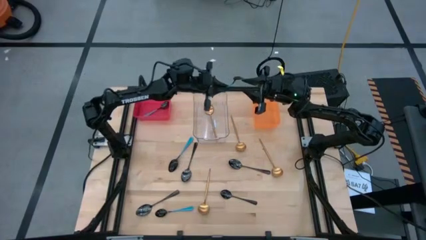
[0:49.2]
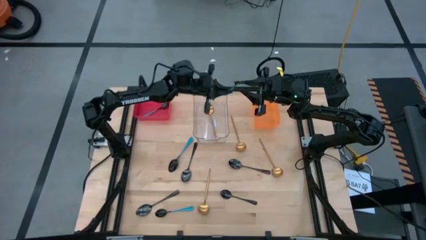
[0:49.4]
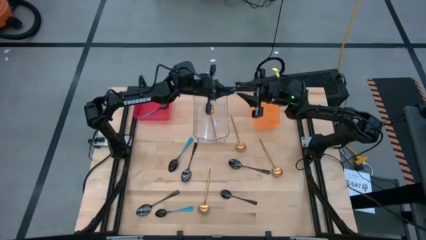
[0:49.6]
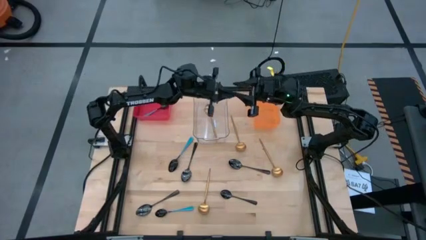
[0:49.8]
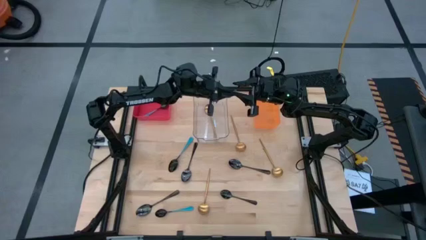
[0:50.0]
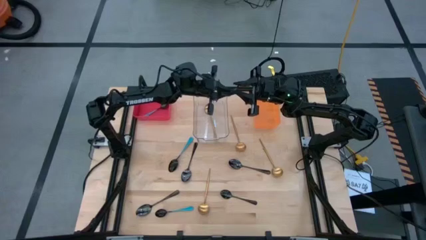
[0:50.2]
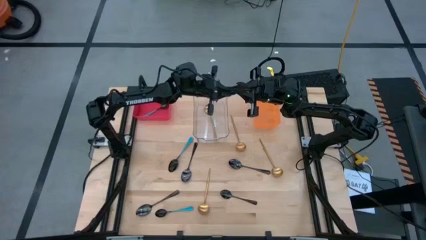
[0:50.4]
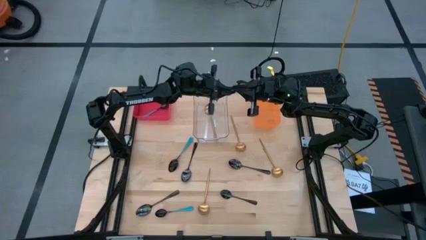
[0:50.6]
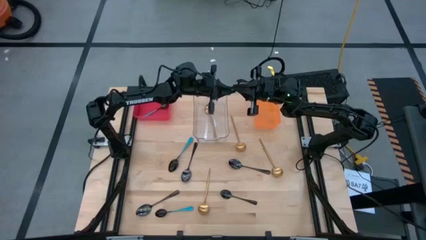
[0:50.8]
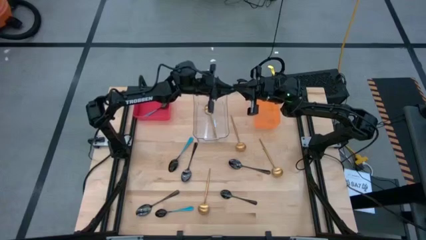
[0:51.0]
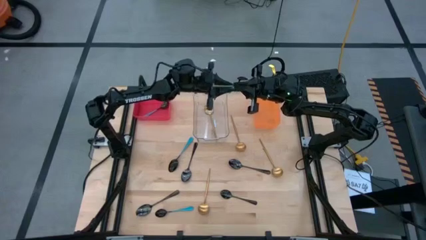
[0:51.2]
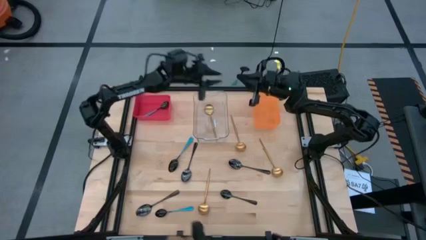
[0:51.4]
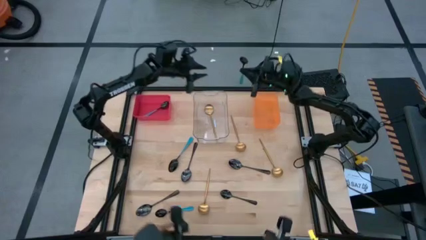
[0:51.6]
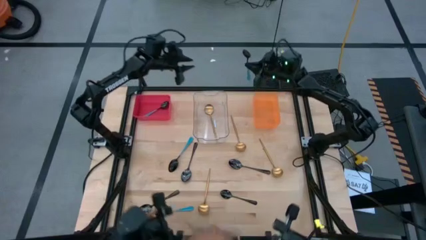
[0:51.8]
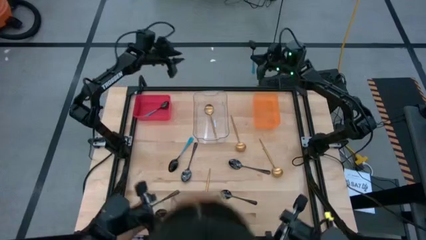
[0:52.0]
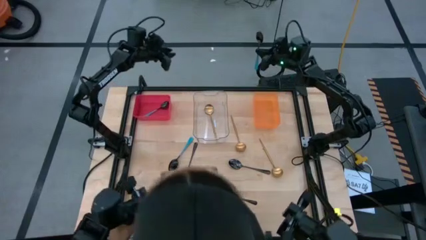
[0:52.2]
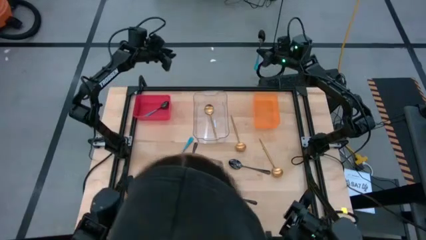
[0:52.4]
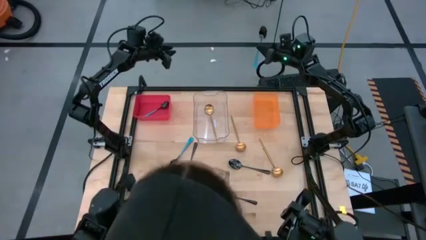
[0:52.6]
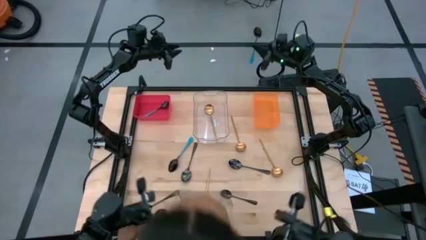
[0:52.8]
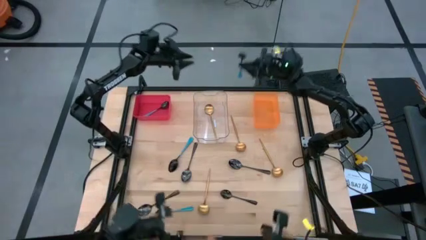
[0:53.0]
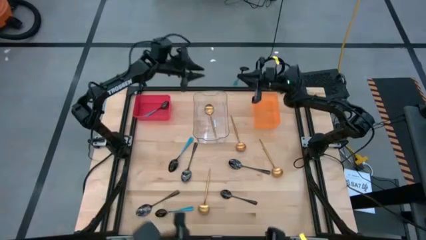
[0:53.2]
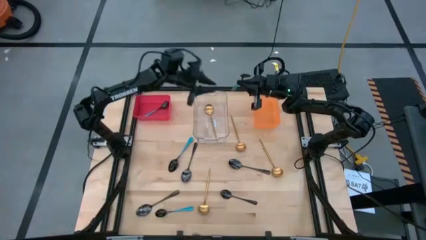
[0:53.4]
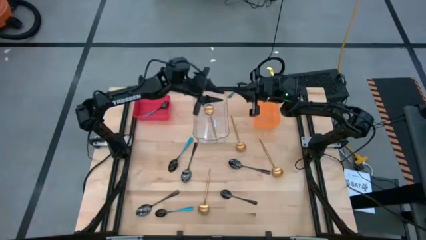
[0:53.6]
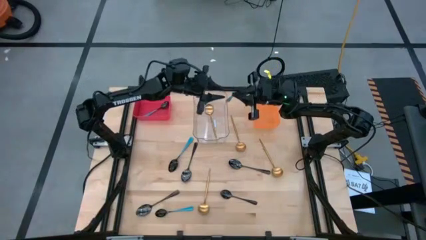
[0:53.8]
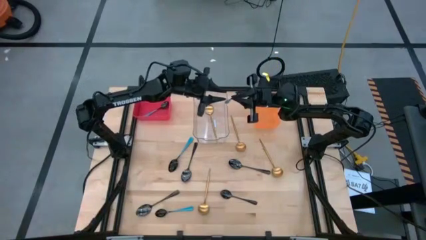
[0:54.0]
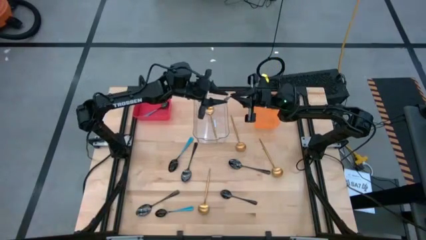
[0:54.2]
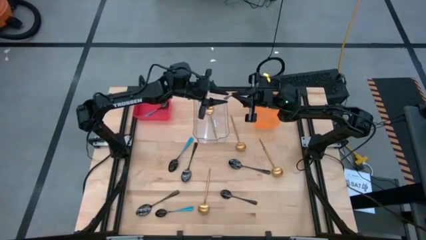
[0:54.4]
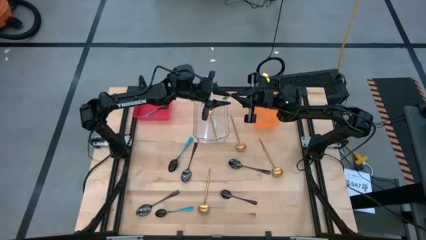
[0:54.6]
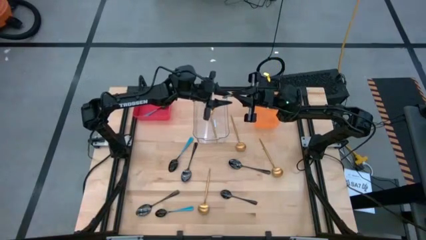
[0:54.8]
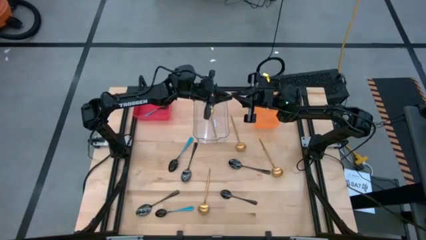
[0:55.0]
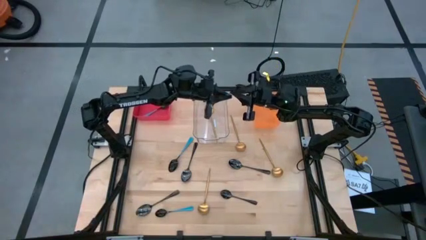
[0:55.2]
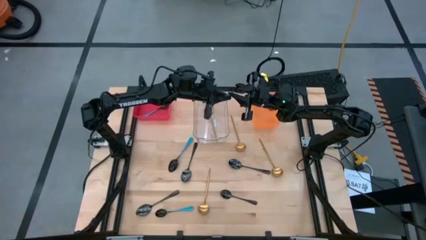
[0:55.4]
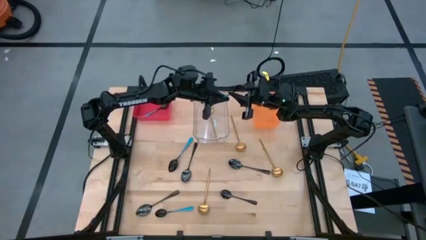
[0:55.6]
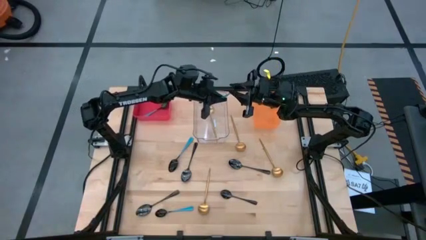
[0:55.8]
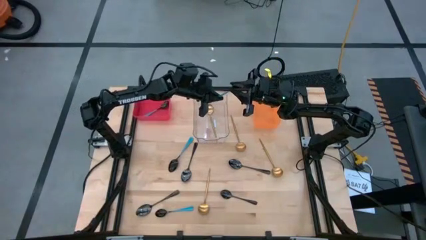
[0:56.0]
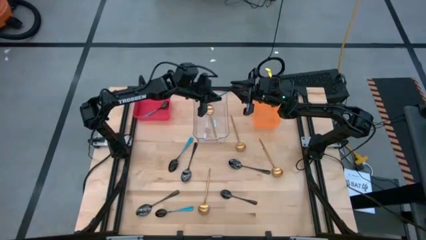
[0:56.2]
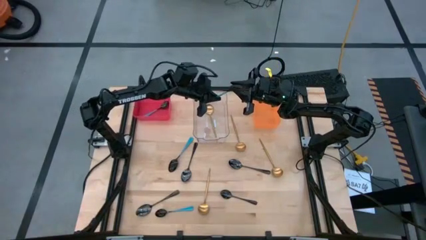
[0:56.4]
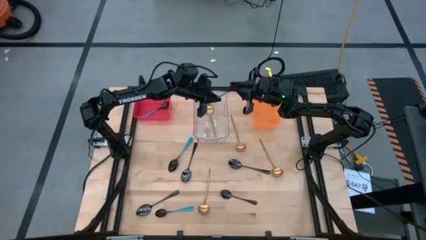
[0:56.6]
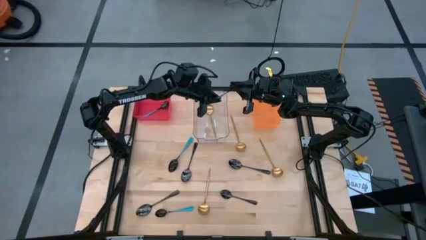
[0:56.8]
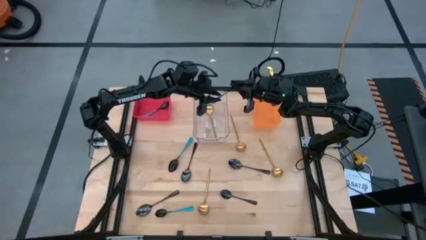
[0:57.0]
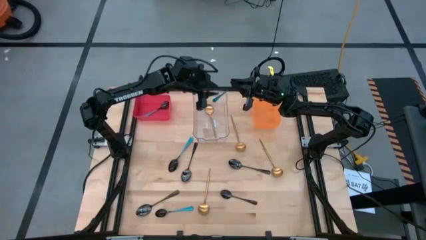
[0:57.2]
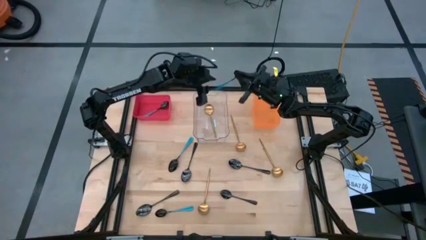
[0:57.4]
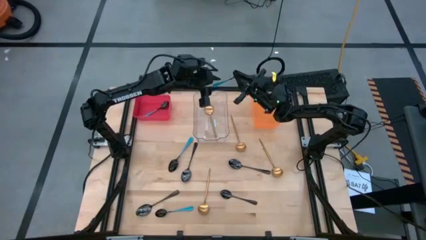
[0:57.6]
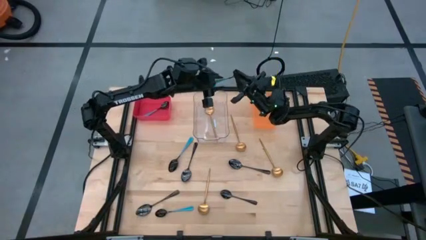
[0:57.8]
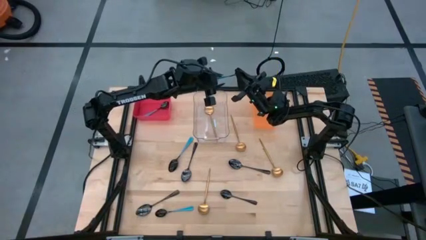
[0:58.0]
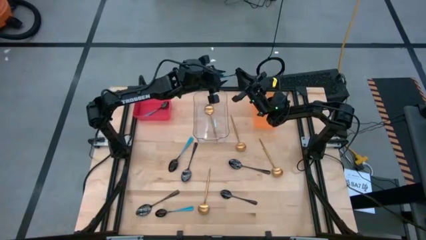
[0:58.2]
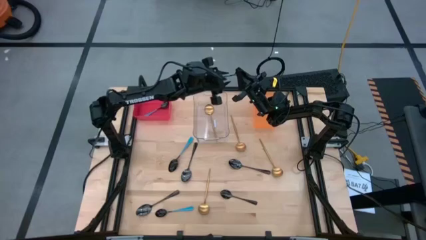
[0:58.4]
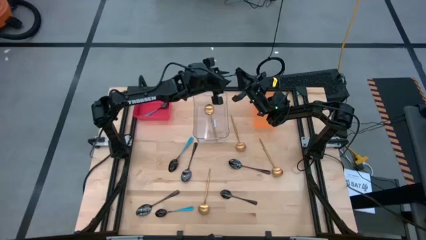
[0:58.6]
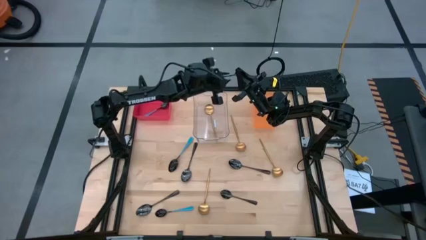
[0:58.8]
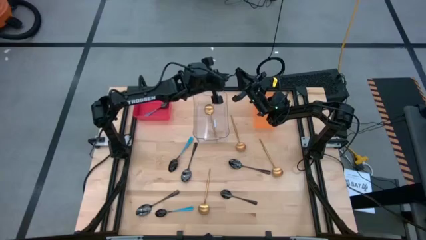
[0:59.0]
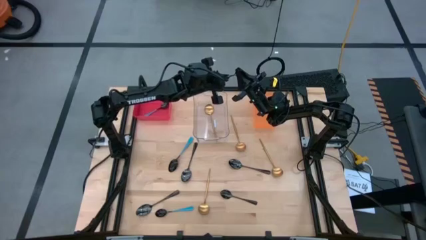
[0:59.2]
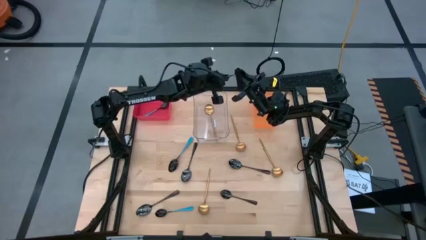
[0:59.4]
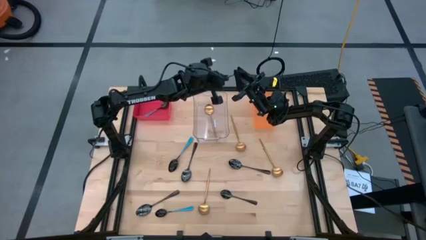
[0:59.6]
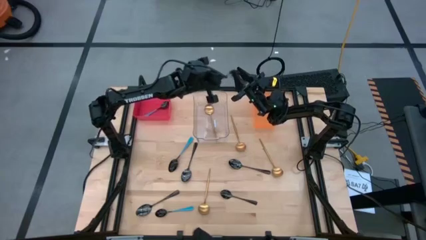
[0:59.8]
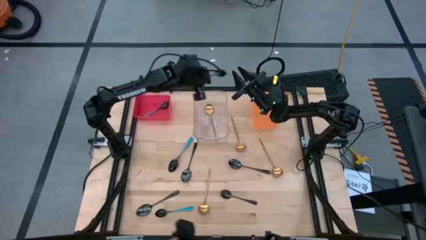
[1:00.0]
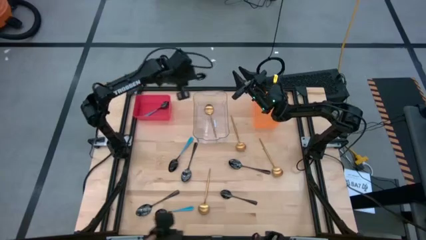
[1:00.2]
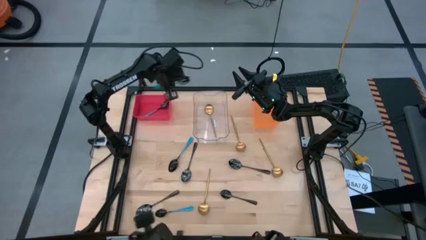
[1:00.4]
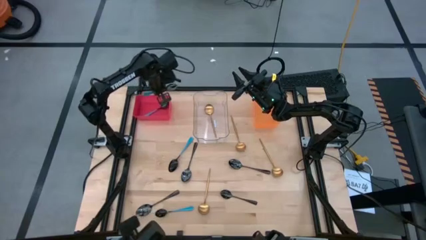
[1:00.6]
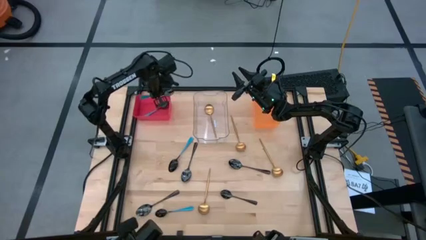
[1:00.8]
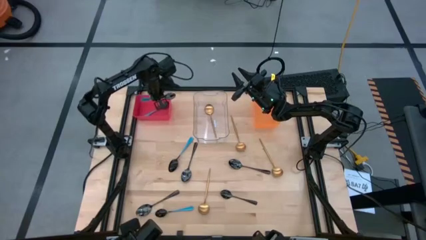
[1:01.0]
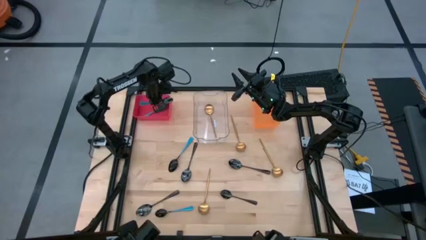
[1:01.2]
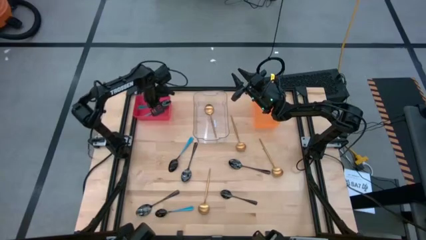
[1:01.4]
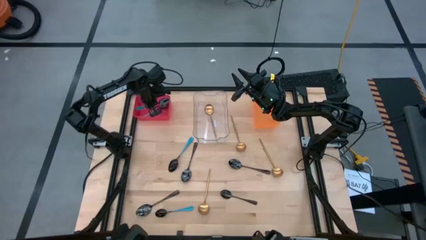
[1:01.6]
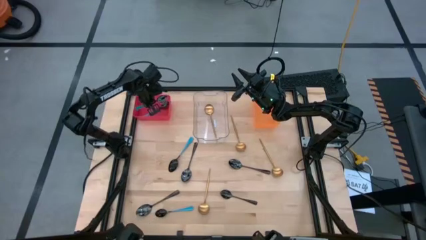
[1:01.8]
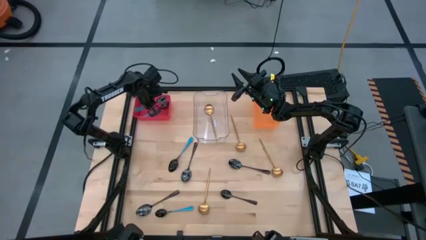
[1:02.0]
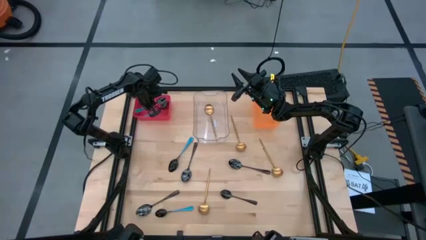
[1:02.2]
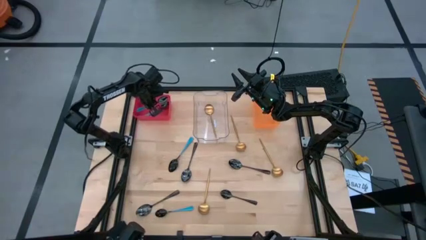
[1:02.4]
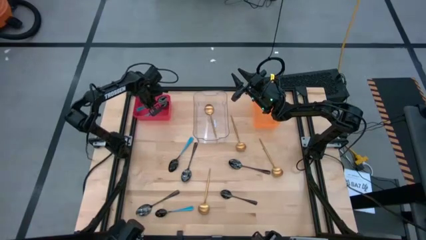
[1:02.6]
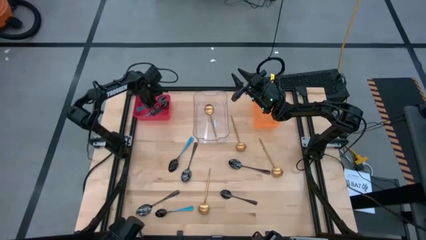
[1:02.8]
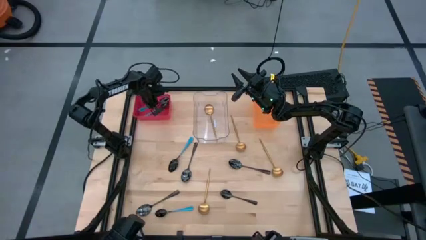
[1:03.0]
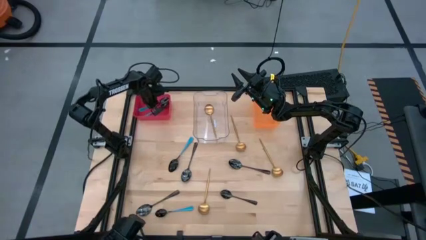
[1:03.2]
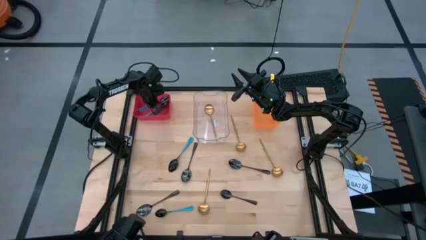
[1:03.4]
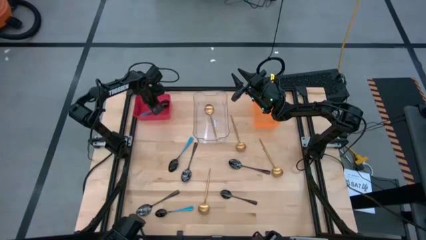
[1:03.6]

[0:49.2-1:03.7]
Task: Sort silverware by color (type)
Put the blue spoon into the red bin
